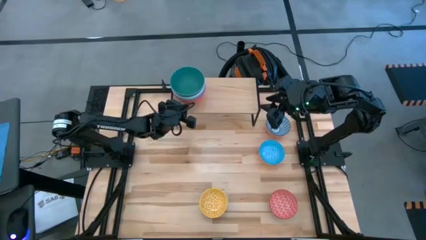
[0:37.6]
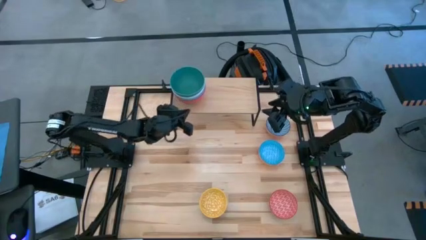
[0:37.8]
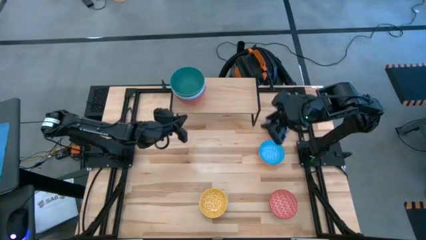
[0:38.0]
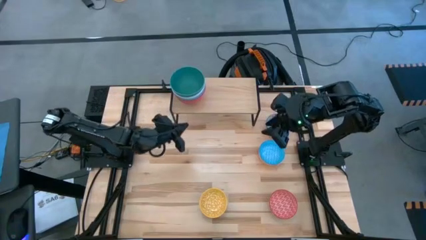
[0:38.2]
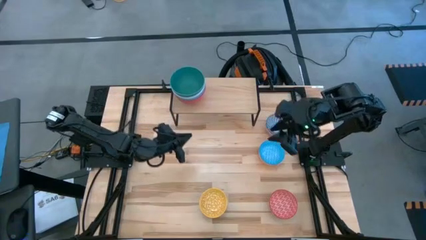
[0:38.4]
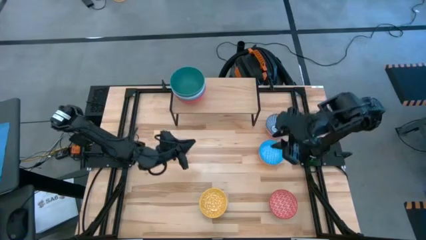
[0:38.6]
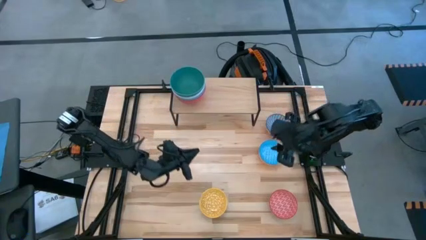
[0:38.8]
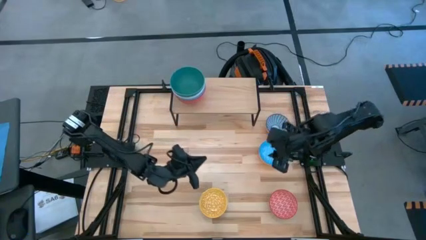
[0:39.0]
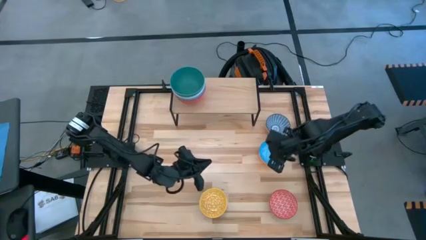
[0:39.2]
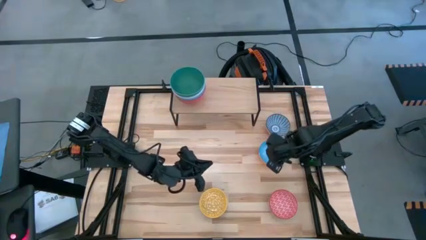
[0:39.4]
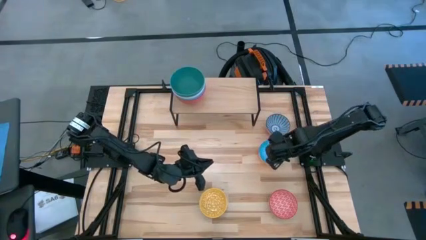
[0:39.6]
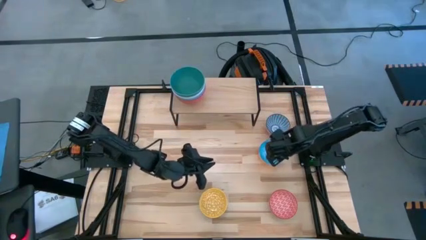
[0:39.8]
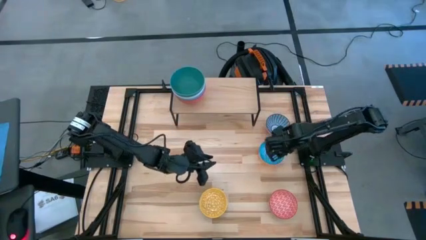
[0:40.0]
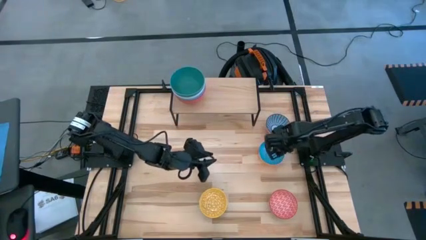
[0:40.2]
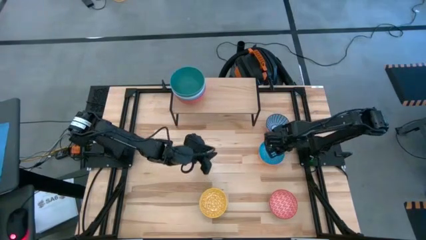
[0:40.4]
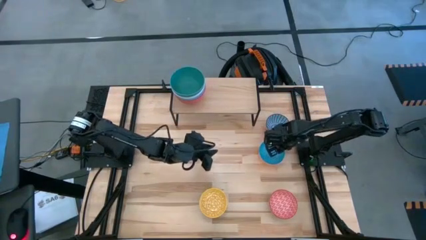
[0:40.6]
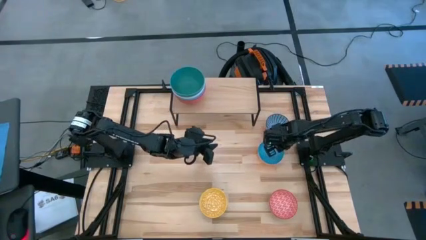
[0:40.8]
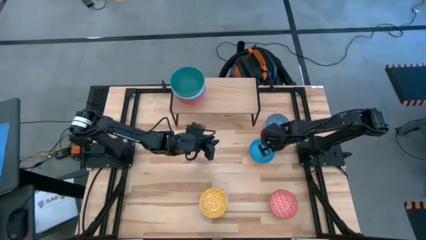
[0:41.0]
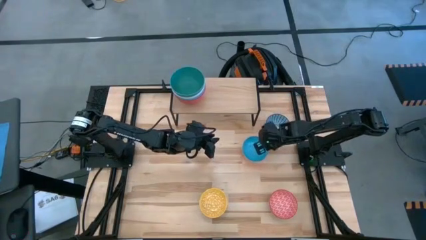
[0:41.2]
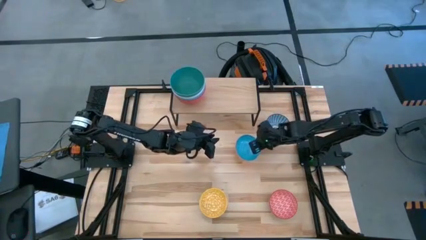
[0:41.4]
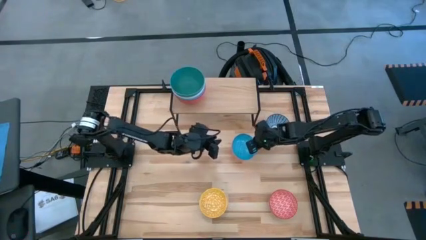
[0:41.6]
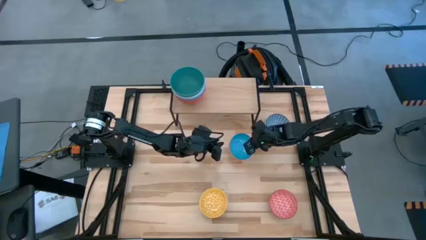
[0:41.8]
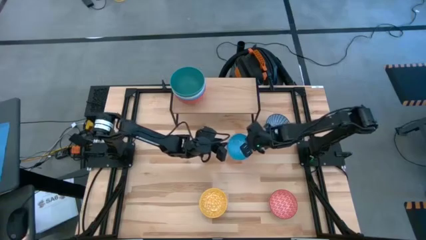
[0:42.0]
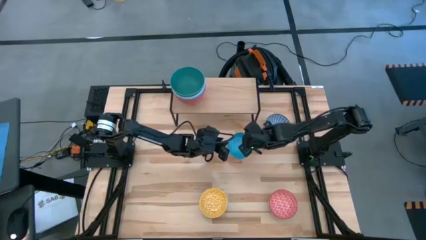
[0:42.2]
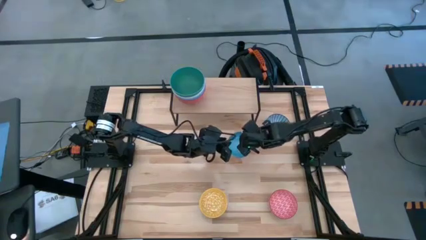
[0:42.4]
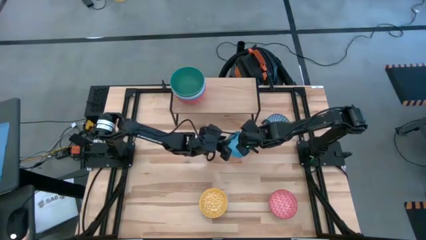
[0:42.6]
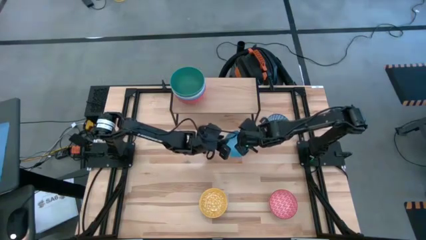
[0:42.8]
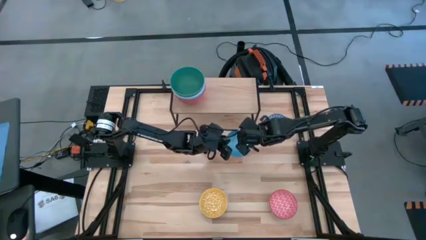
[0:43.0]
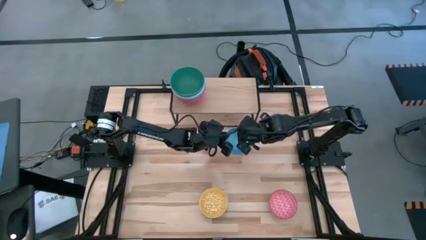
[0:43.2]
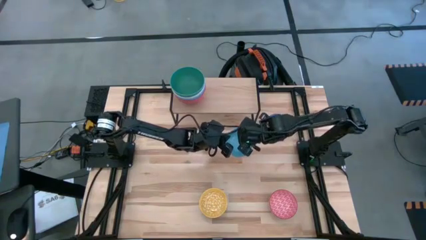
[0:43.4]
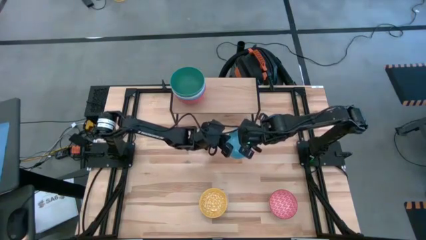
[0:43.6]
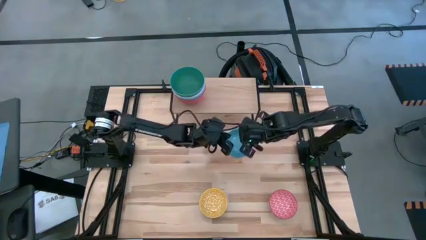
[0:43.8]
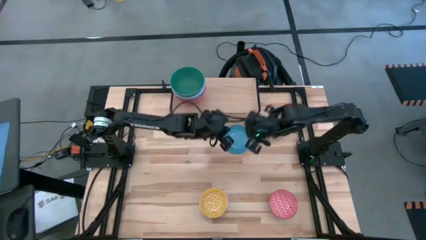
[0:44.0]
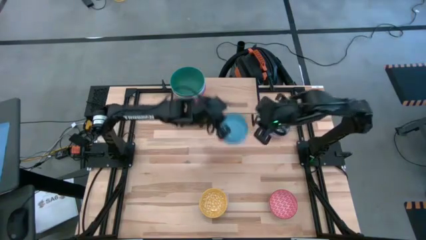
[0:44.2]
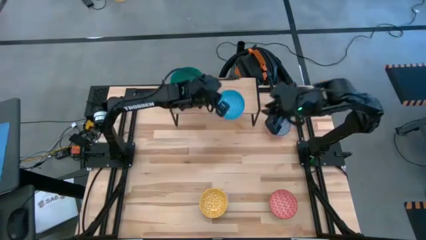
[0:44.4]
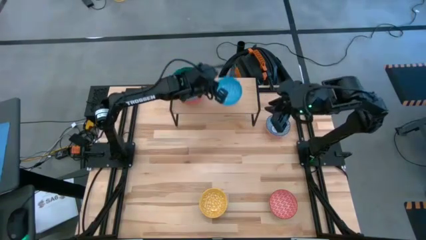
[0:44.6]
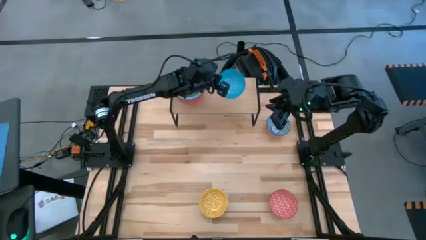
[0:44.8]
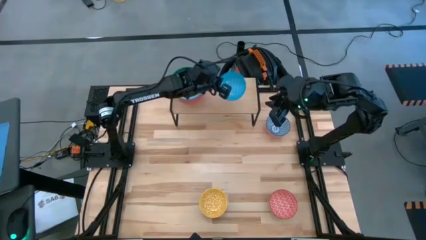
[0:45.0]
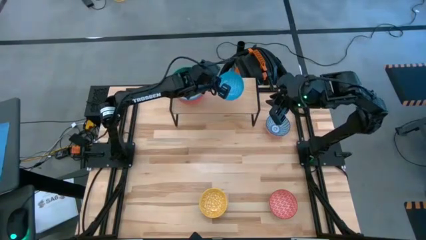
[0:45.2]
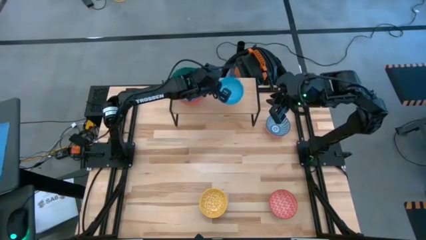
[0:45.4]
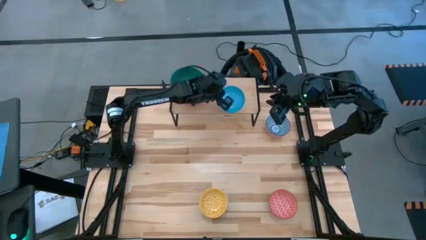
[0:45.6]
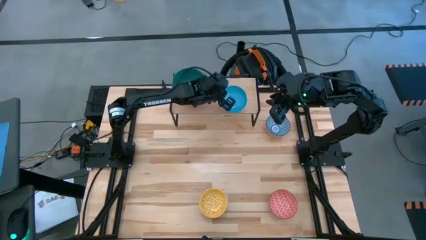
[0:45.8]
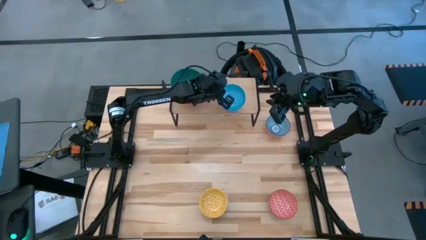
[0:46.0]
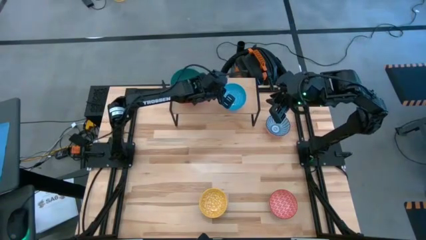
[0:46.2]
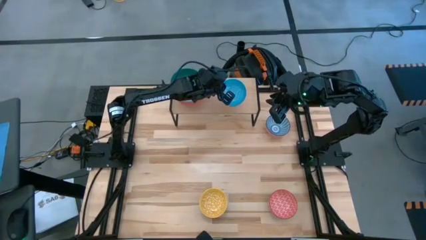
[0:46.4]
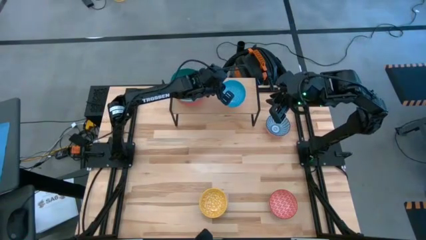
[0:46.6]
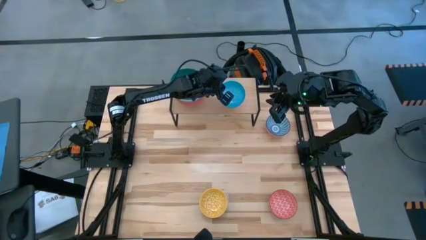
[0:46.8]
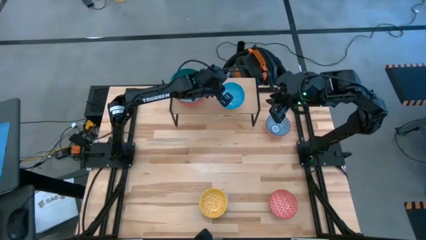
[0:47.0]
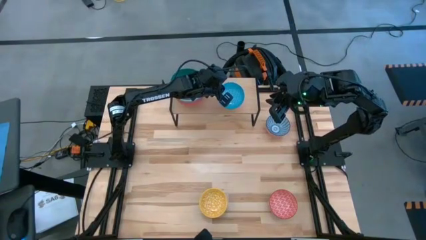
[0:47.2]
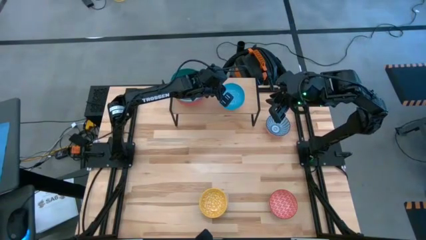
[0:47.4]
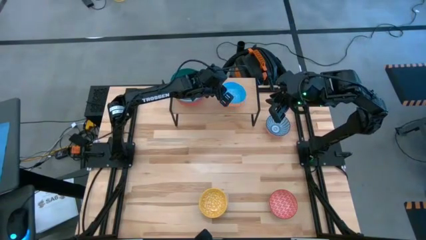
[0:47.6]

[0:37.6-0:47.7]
Task: Place and stack bowls onto a shelf
Put the light blue pattern bowl on the shelf

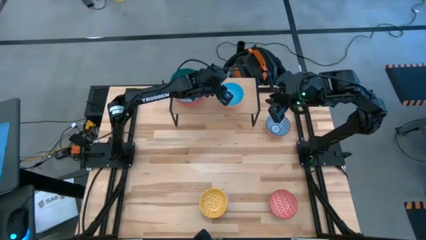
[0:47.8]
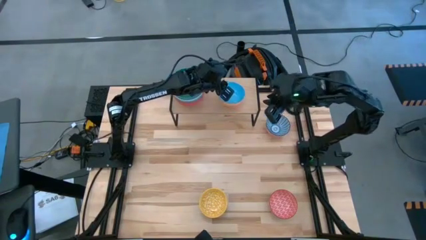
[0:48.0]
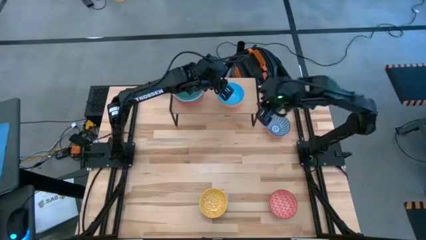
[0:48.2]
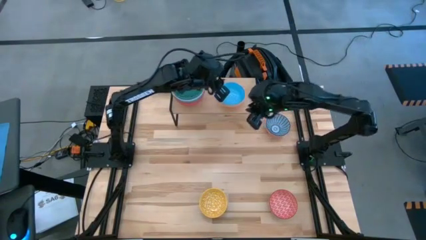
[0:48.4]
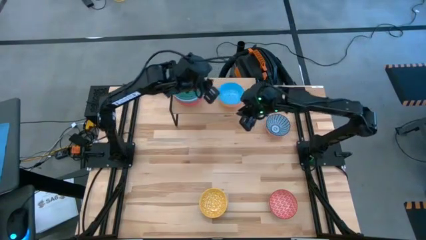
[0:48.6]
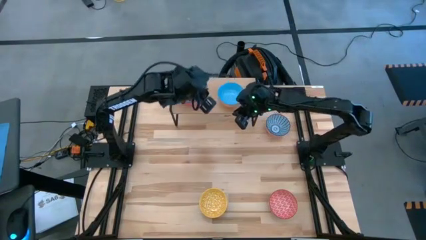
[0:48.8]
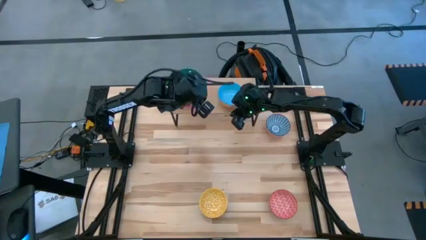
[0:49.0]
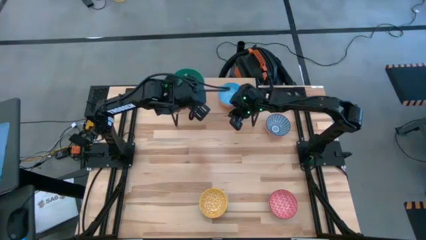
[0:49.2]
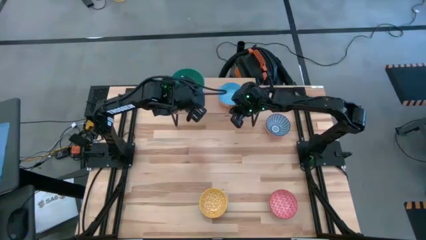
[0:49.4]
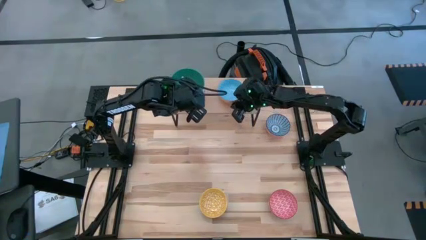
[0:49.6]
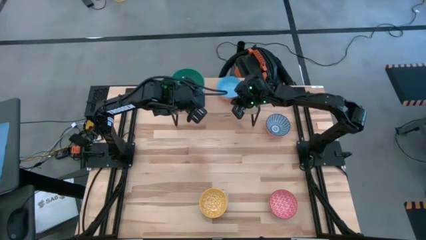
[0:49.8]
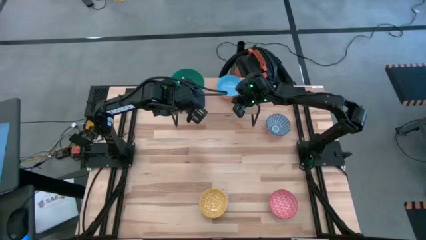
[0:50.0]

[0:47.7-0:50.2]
Adjust the light blue pattern bowl on the shelf

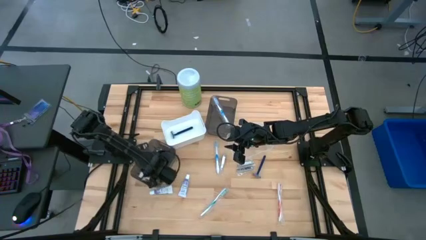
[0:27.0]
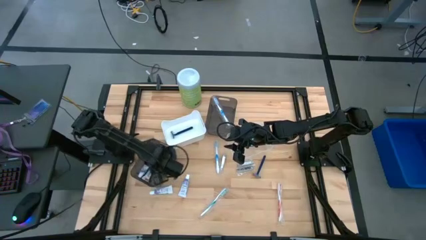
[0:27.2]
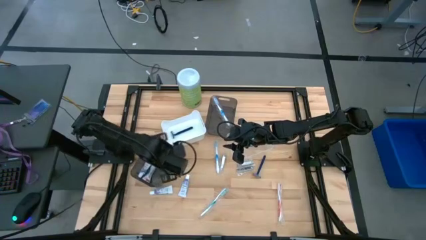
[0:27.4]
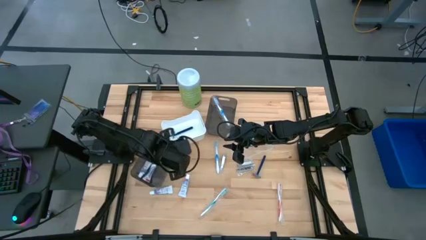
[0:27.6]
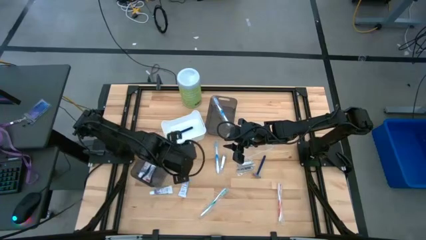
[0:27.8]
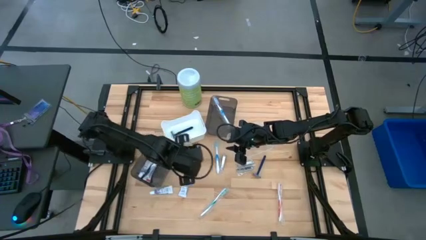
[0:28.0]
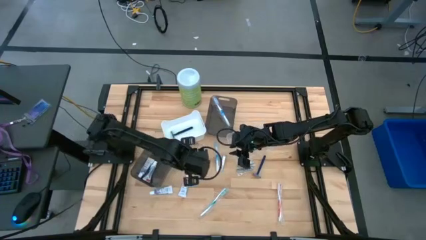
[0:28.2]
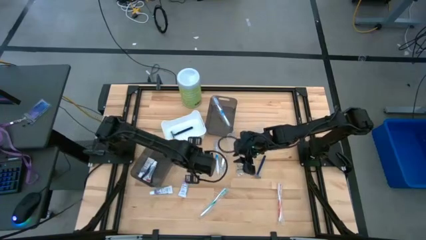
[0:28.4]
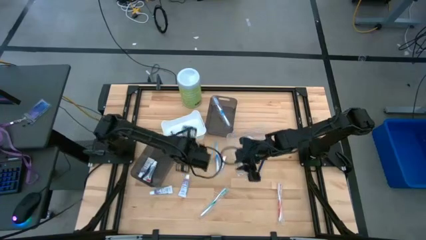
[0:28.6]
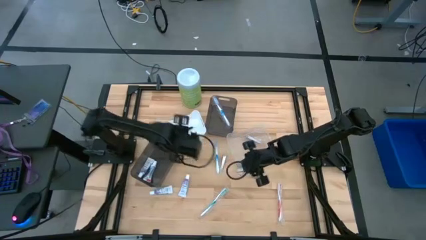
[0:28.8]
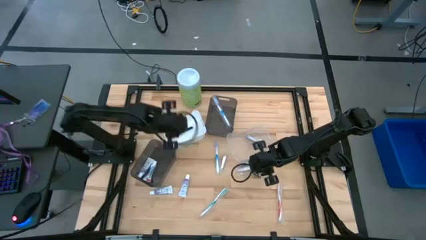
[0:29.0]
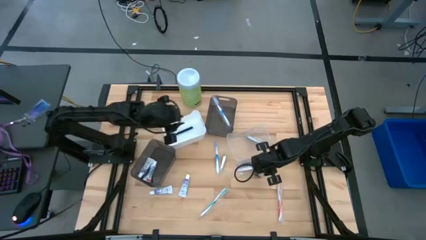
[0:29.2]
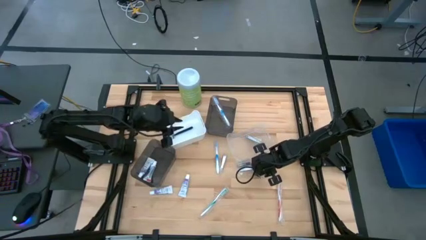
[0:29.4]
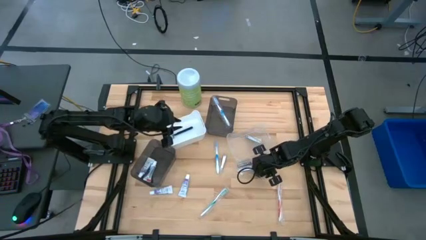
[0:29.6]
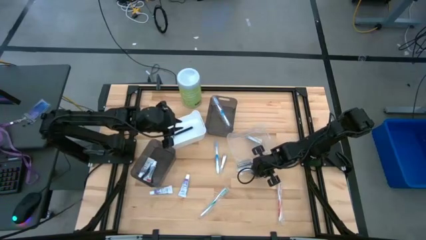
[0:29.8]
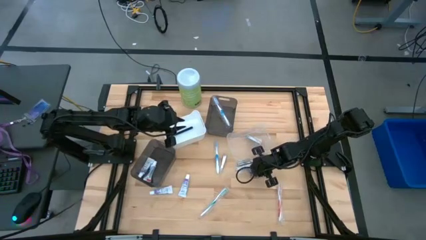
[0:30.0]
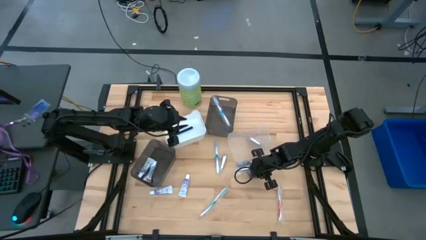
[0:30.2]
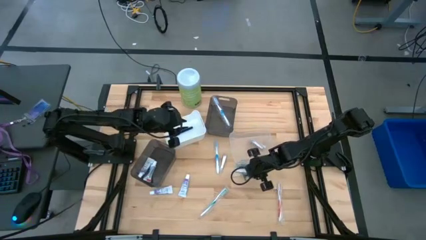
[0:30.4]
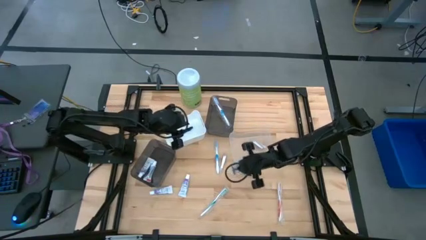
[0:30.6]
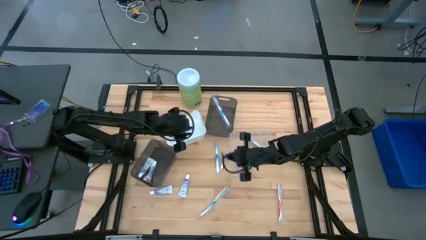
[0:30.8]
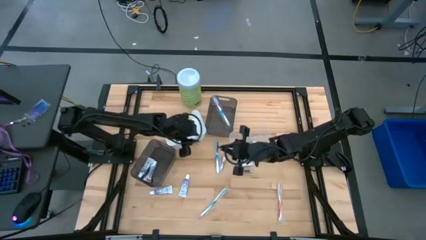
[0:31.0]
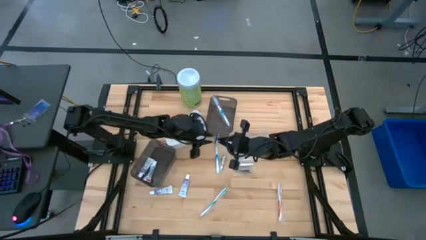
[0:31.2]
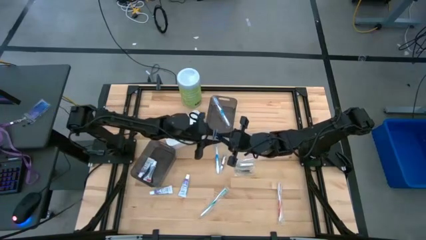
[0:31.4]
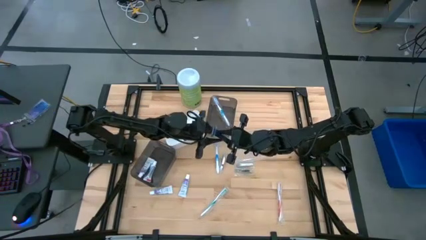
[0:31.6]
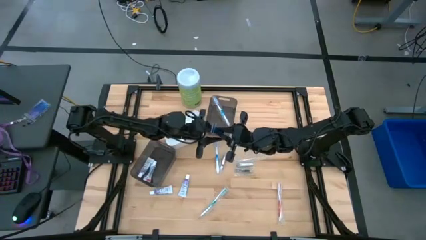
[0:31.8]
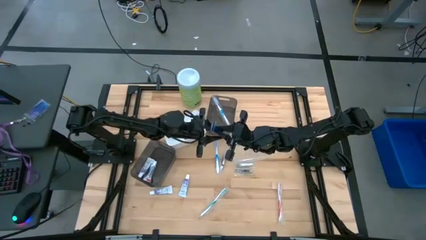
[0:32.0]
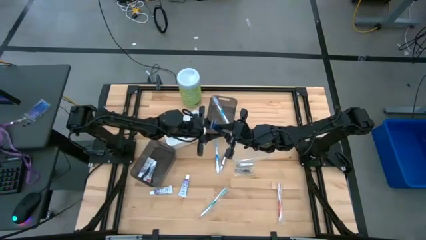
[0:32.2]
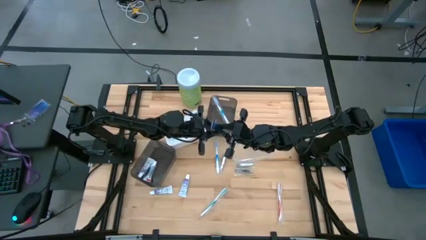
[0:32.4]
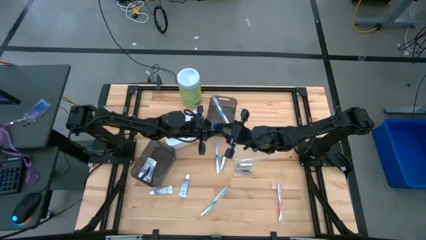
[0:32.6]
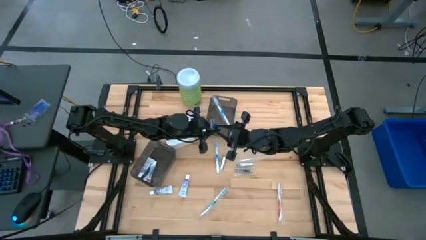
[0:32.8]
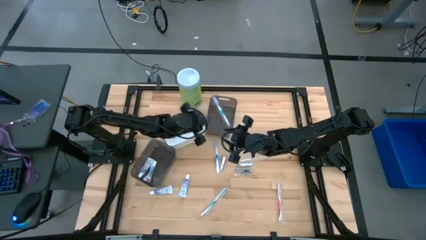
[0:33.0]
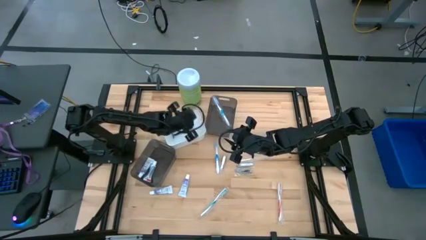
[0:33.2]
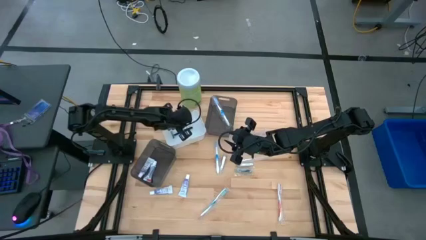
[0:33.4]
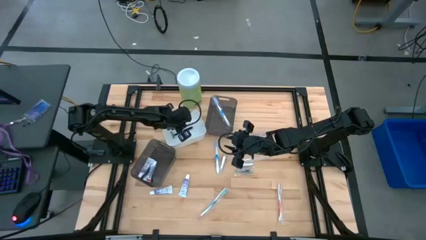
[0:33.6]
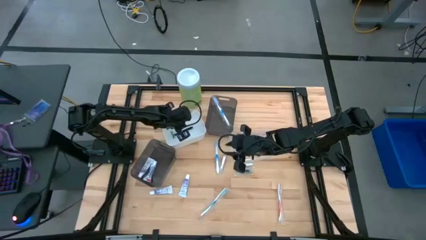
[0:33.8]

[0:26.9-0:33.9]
Task: Pick & Place Travel size toiletries
Put the blue razor into the white bin
